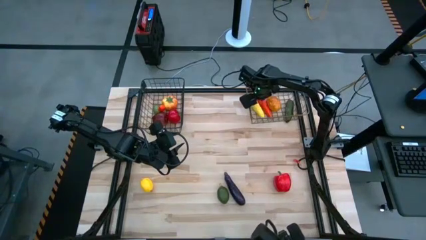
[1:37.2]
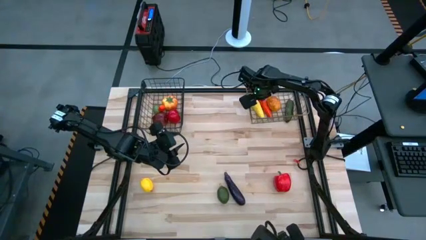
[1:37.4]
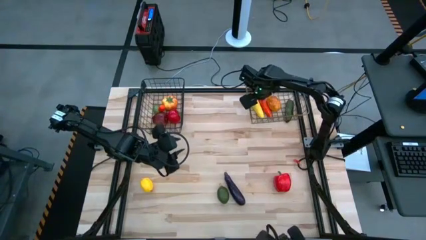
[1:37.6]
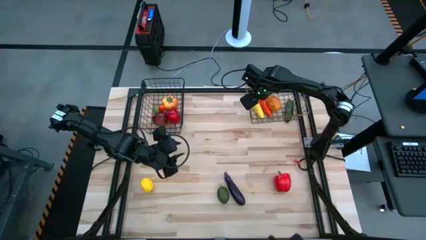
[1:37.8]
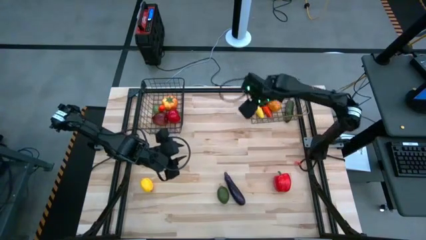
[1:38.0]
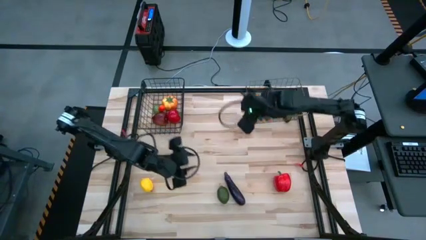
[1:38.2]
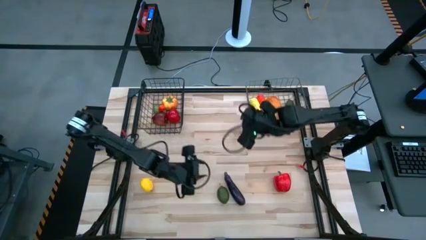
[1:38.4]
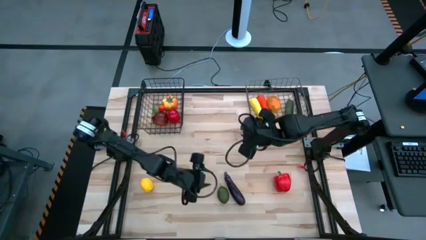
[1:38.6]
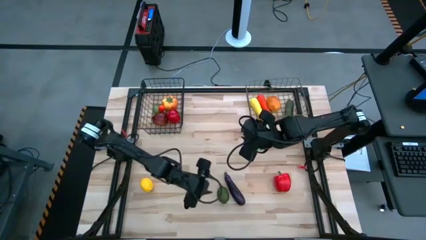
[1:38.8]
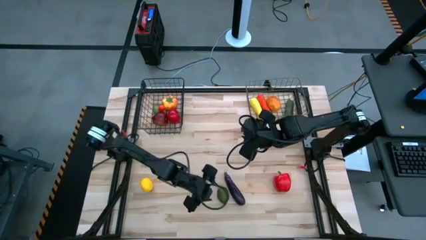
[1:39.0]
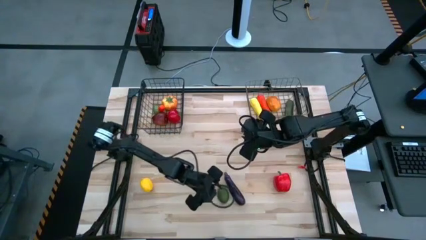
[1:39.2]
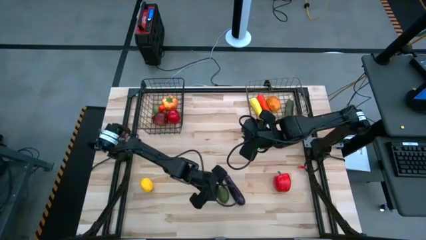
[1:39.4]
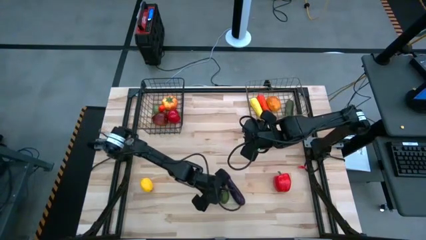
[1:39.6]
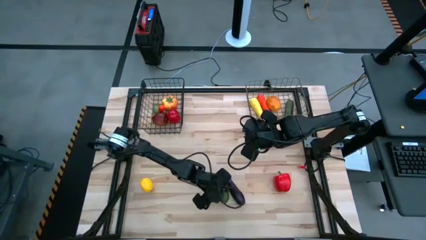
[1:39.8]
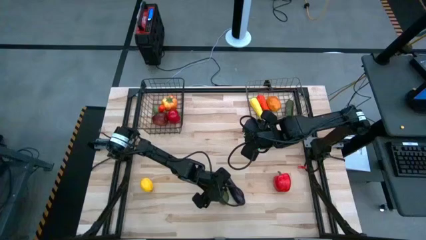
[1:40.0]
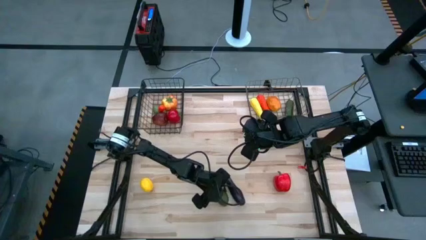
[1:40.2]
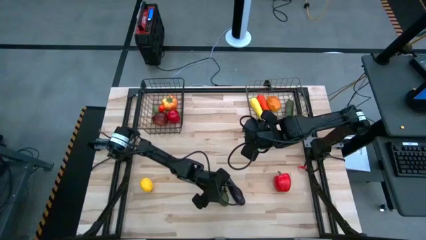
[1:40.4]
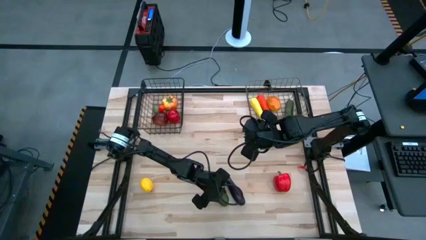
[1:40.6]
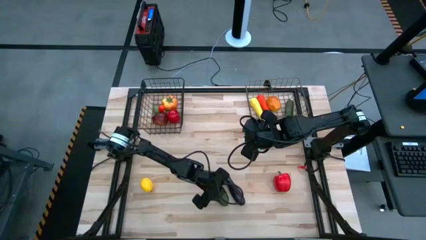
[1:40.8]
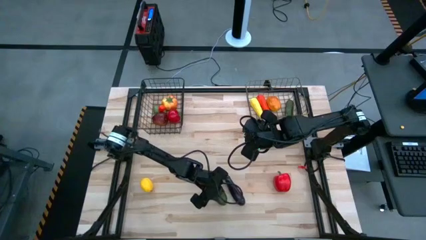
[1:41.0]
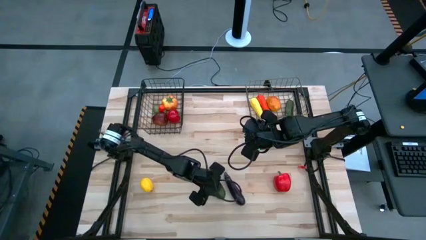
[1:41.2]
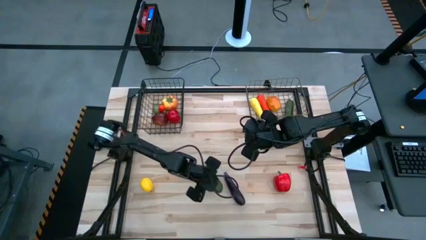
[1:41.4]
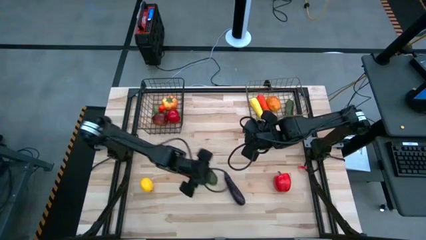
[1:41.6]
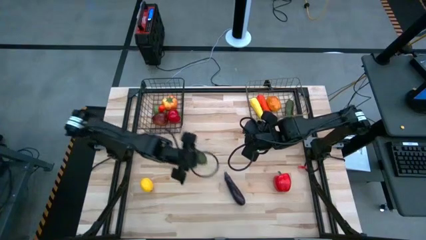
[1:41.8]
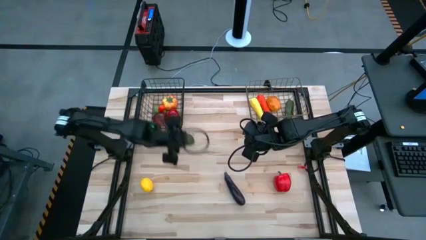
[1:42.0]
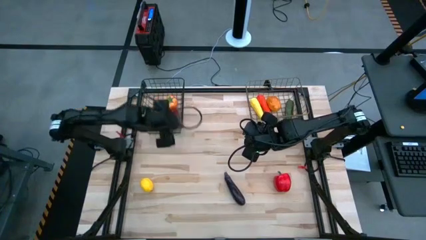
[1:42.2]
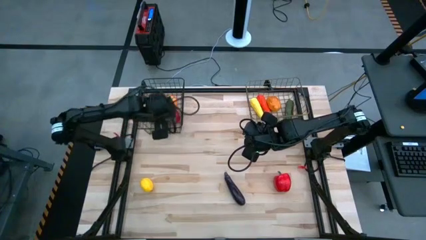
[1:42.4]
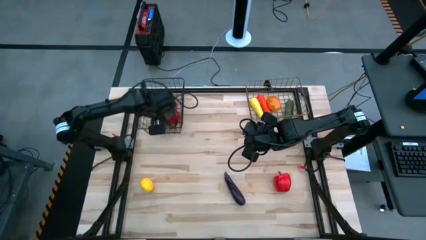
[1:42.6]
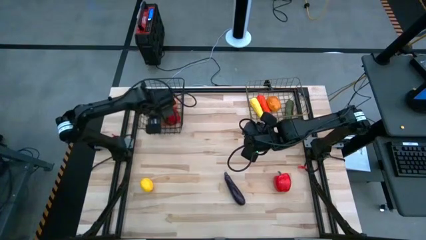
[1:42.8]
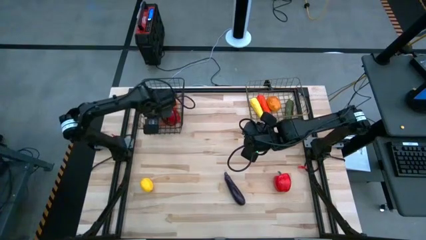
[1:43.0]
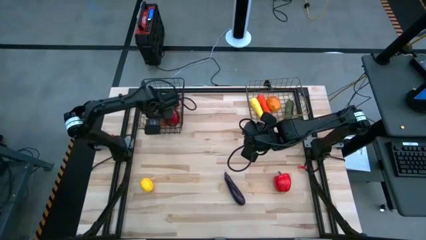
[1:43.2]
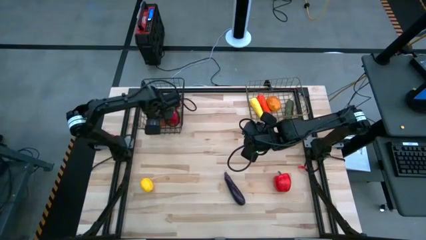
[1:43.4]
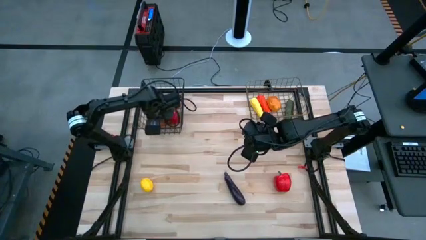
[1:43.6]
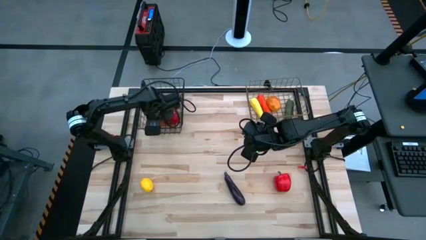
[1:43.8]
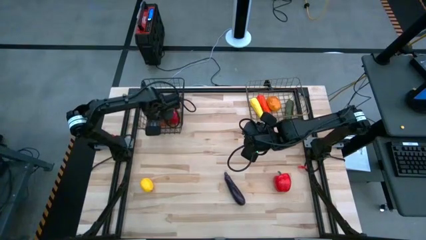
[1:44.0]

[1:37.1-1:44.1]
Task: Sort produce into baskets
Put the lime into the left wire basket

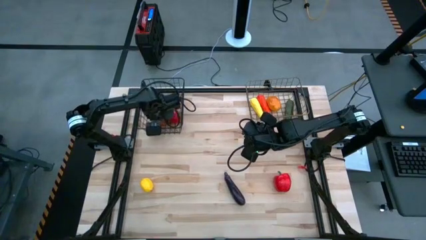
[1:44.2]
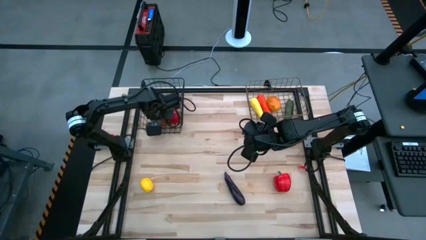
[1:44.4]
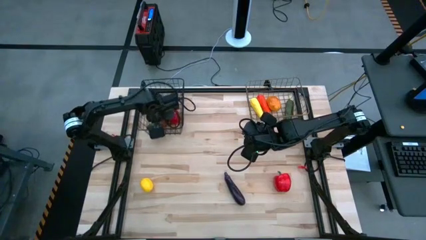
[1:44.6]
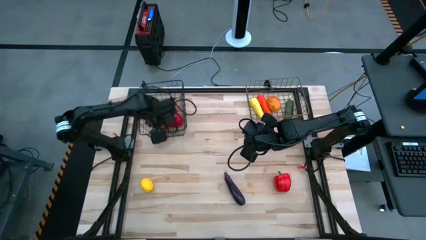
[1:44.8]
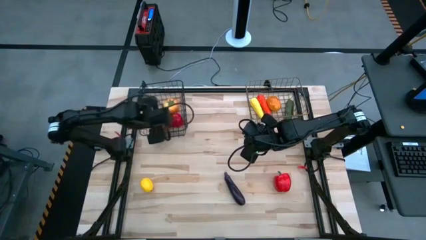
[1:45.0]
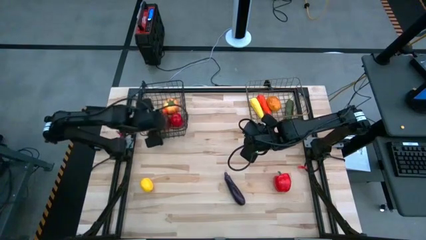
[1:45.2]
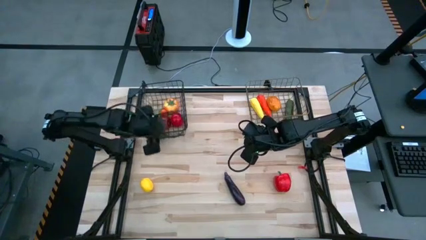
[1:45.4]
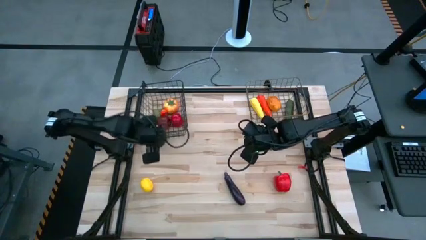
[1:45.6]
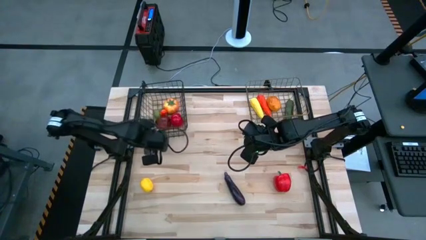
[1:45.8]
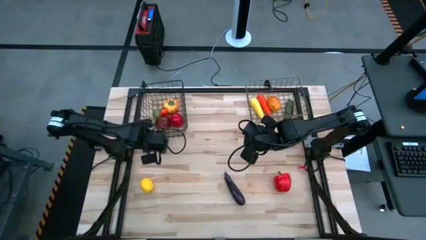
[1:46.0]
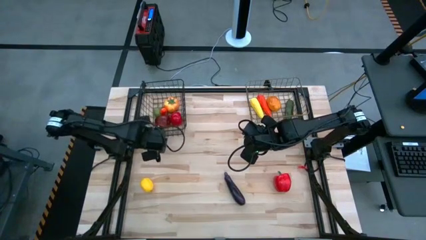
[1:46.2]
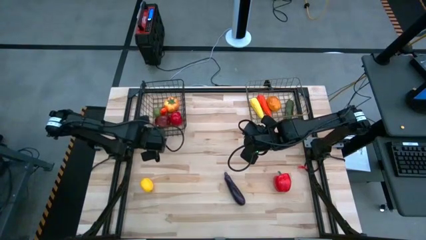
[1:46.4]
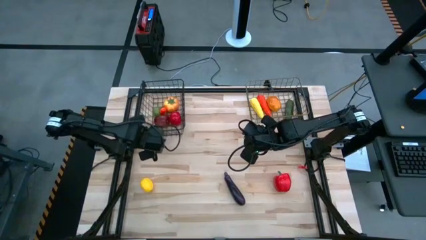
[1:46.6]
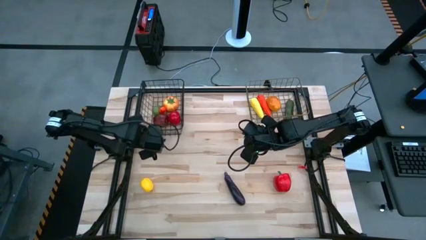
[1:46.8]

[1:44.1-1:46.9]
Adjust the left wire basket

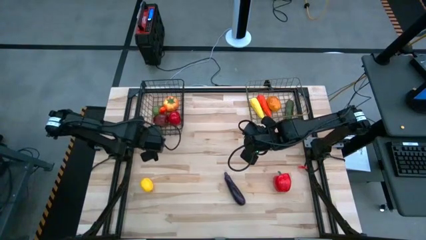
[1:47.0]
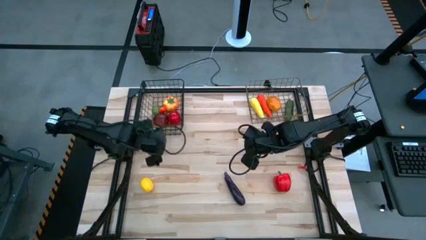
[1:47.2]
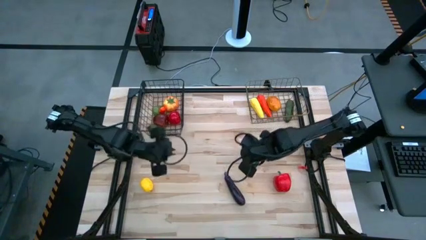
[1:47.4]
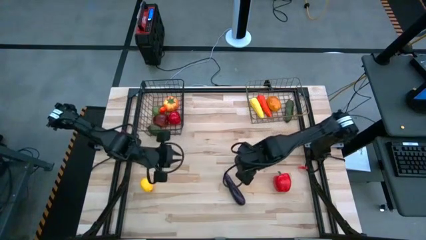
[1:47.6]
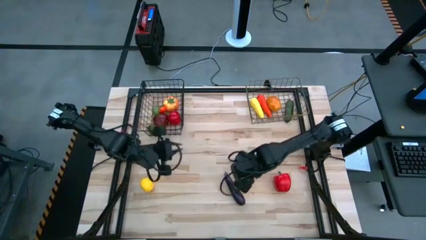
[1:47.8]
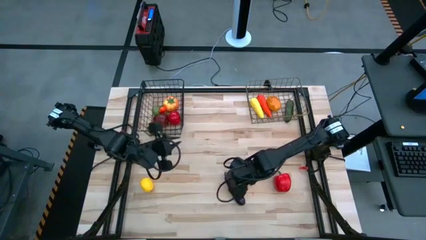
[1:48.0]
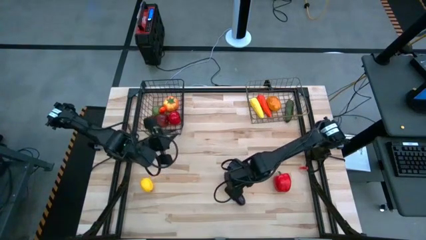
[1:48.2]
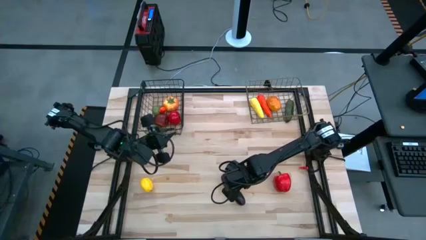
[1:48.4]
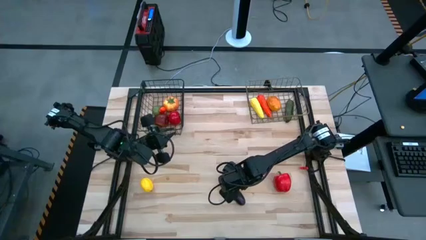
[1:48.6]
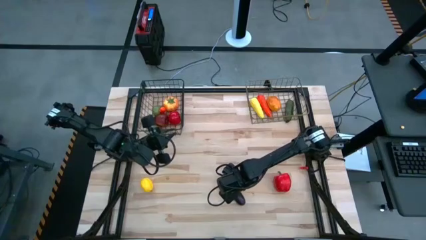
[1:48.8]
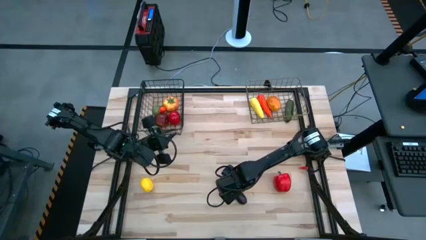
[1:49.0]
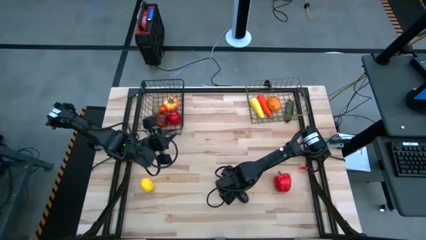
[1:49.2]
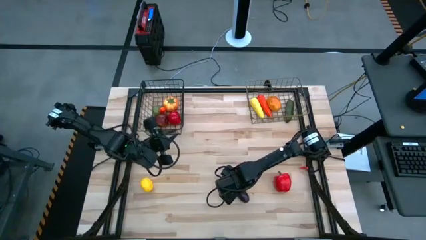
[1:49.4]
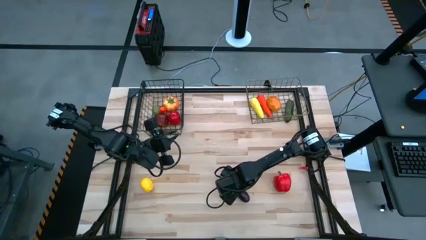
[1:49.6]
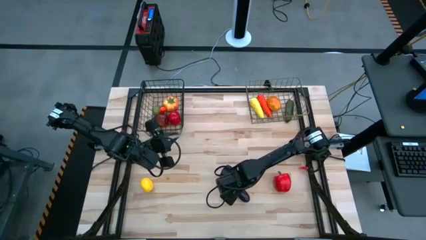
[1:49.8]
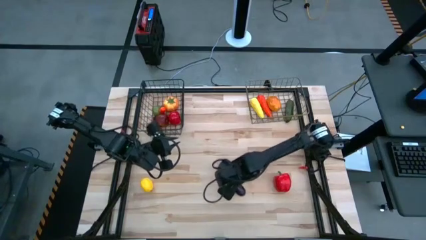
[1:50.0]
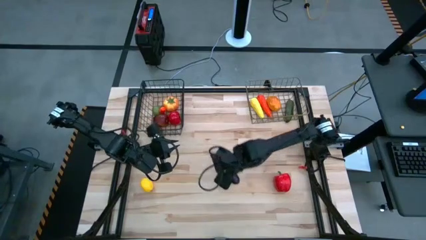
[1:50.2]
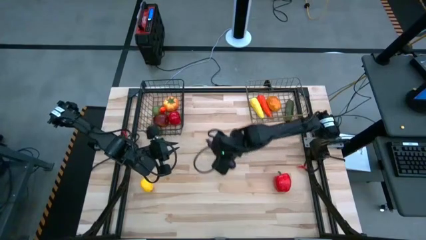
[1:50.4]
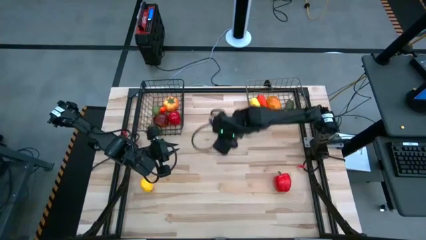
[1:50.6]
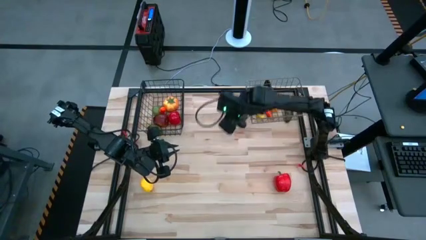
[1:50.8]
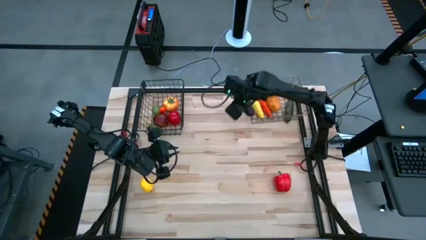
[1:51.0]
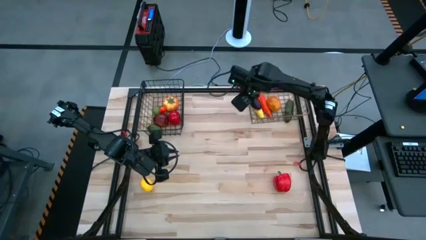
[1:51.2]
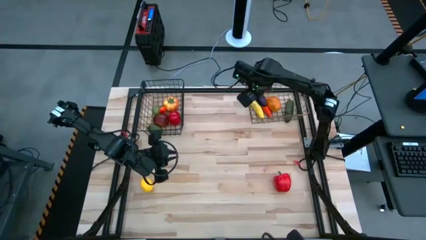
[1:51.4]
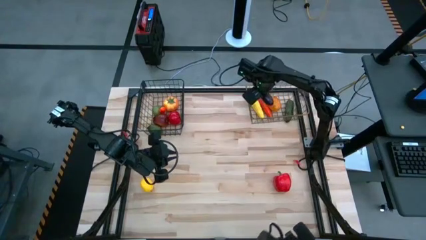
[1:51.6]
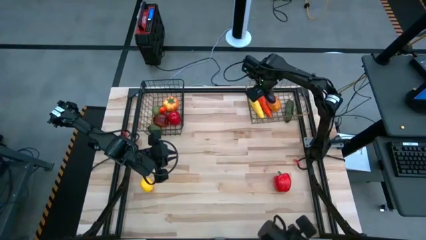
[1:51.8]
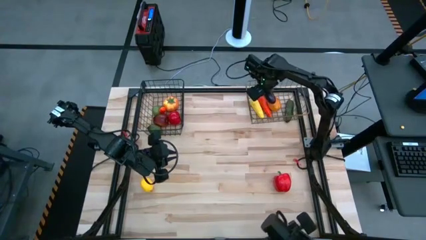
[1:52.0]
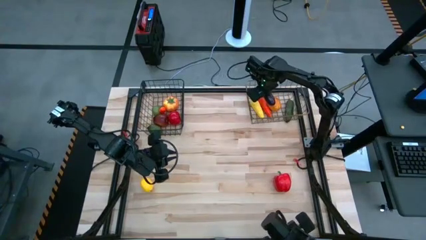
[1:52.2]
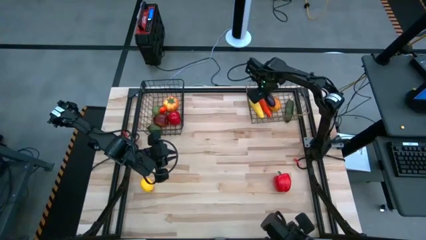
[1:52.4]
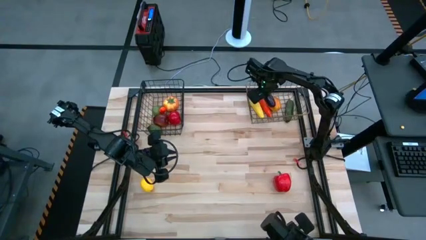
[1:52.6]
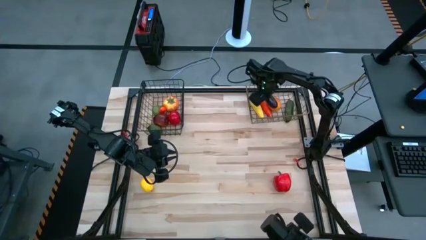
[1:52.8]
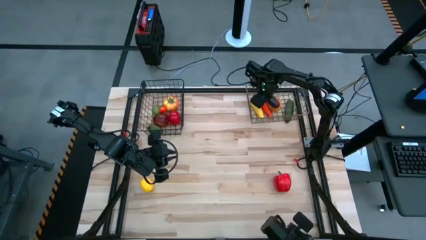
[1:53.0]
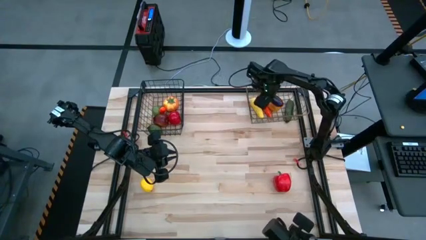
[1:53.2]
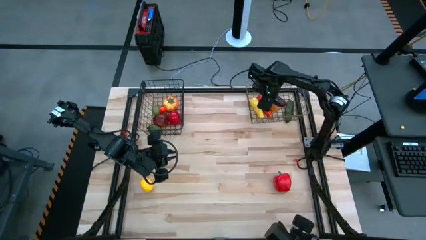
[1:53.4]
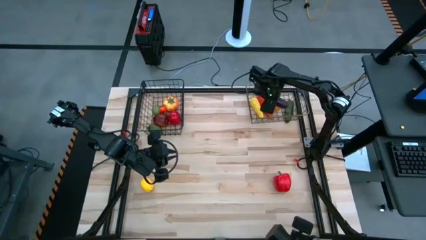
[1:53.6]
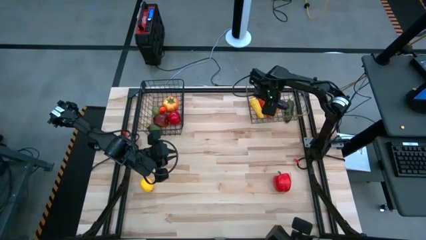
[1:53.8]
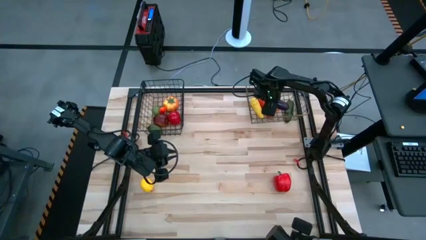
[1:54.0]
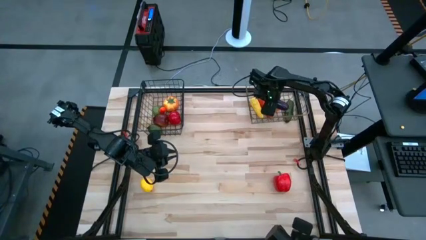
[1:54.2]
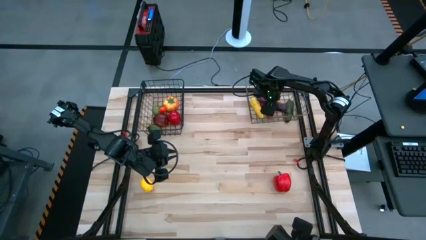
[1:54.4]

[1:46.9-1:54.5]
Put the eggplant into the right wire basket
